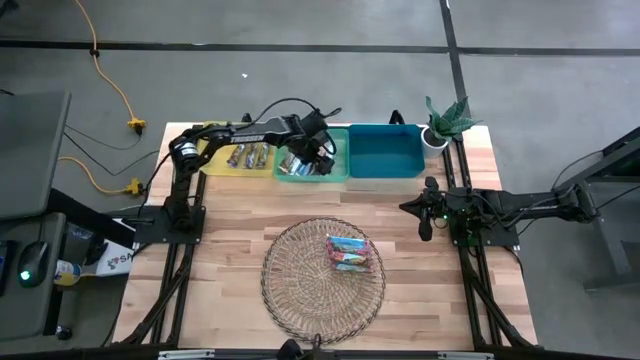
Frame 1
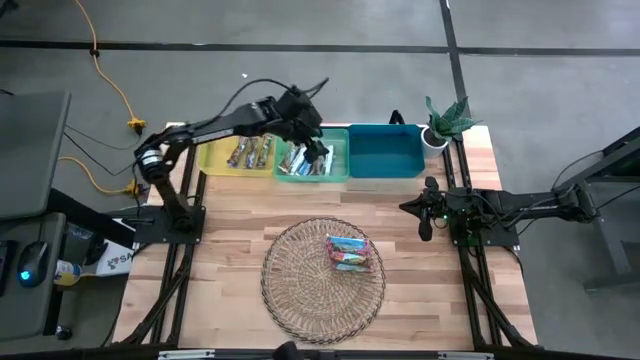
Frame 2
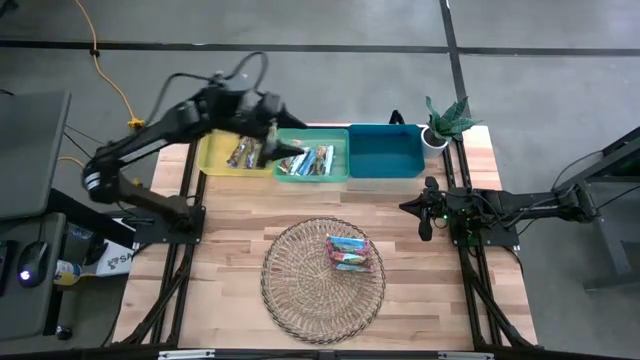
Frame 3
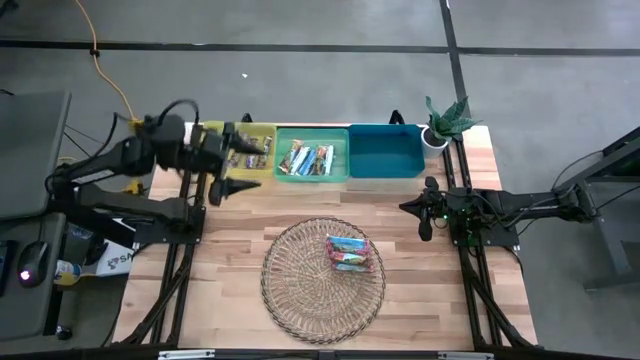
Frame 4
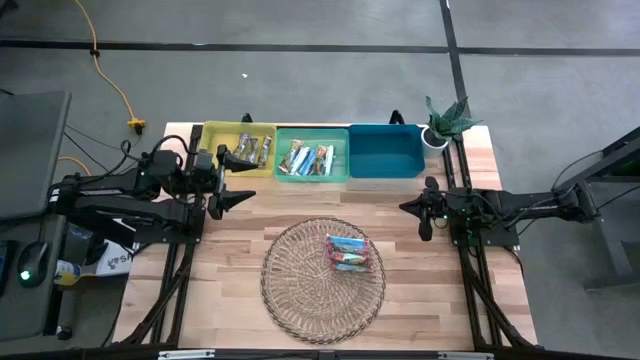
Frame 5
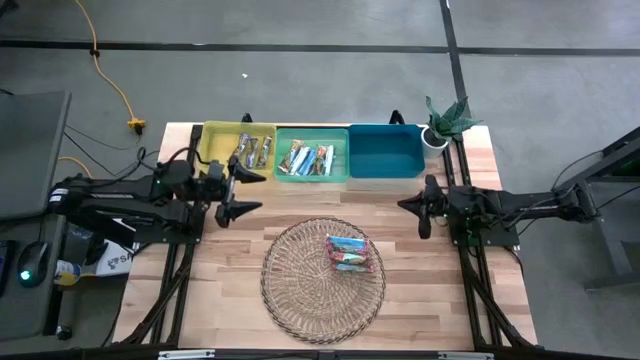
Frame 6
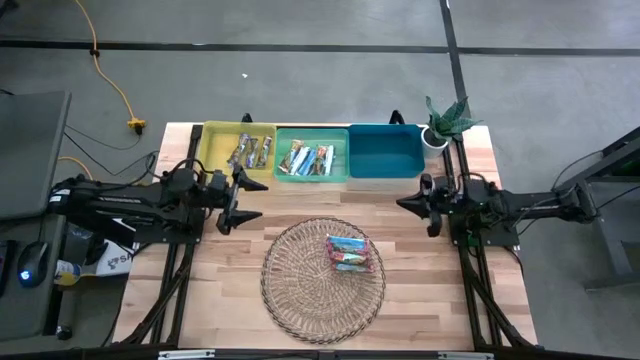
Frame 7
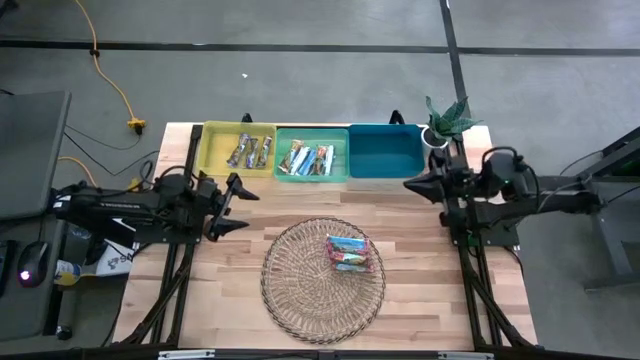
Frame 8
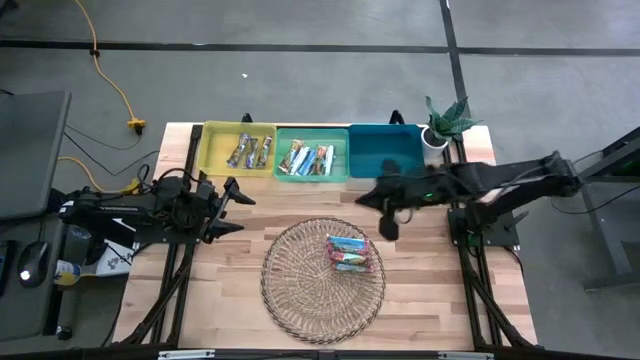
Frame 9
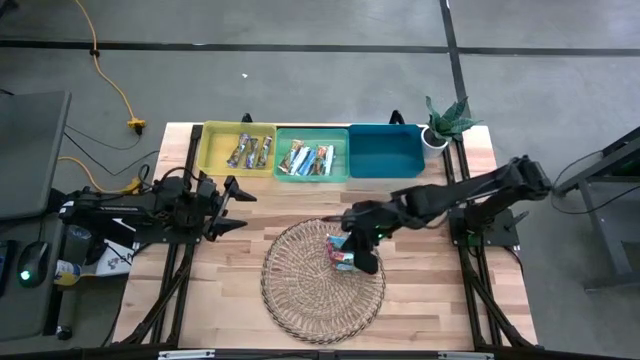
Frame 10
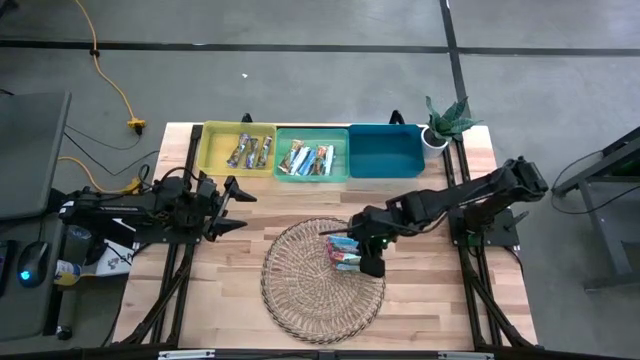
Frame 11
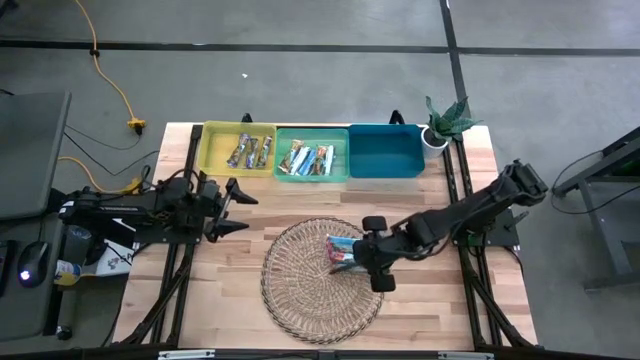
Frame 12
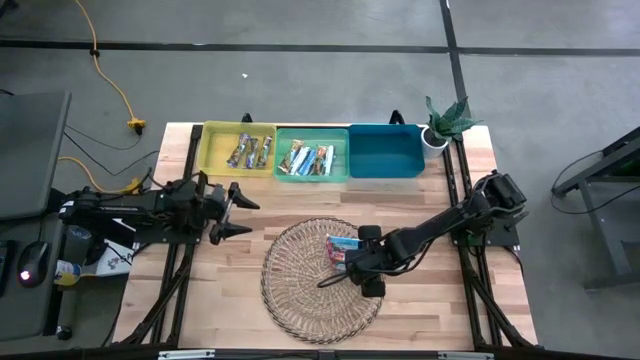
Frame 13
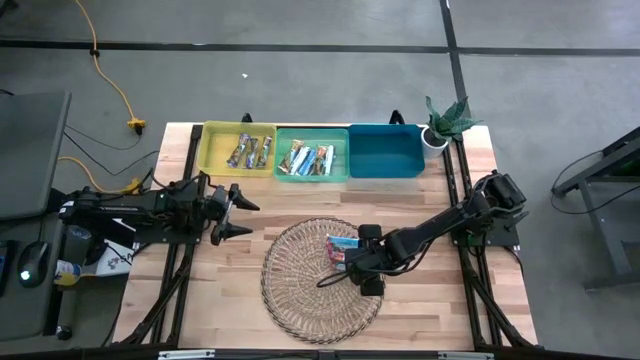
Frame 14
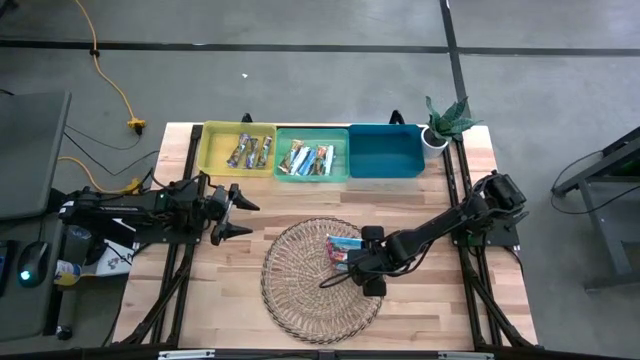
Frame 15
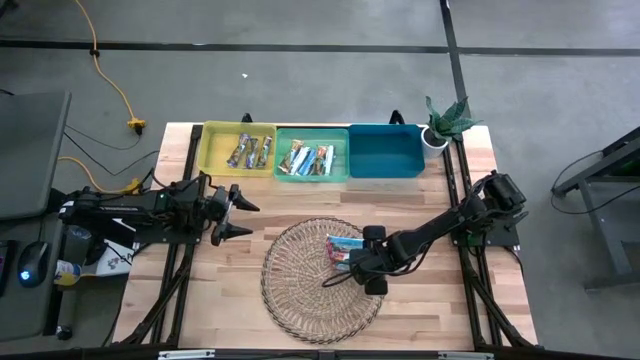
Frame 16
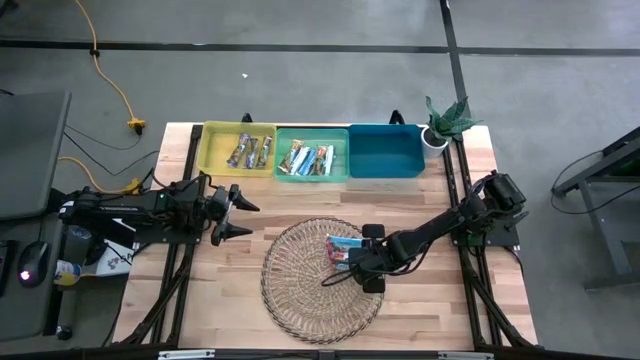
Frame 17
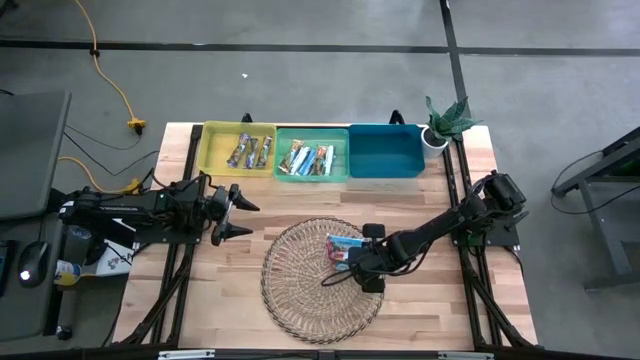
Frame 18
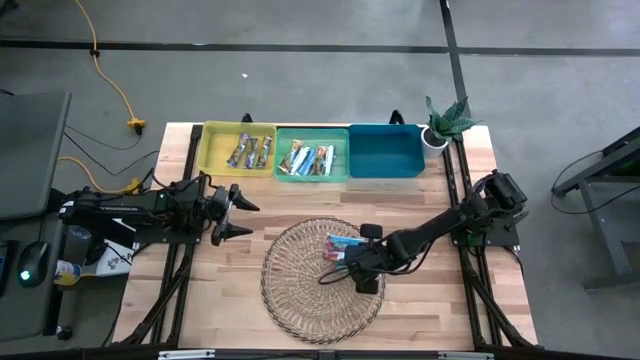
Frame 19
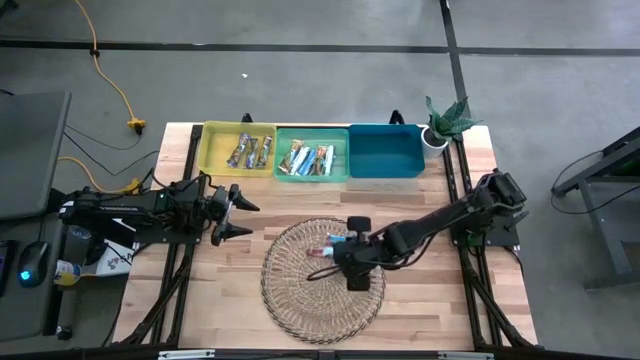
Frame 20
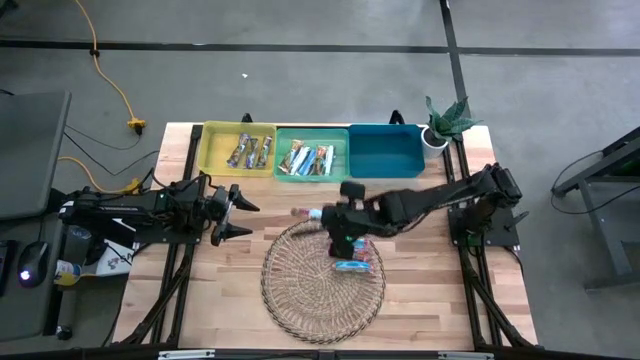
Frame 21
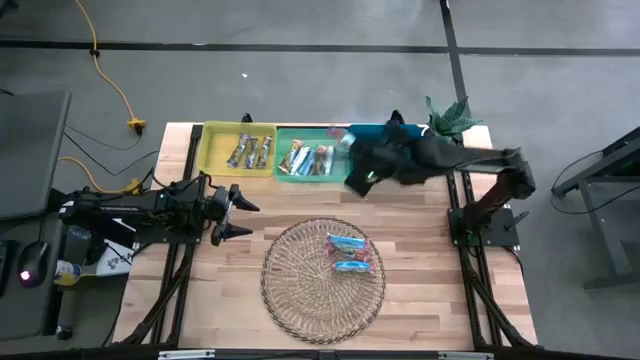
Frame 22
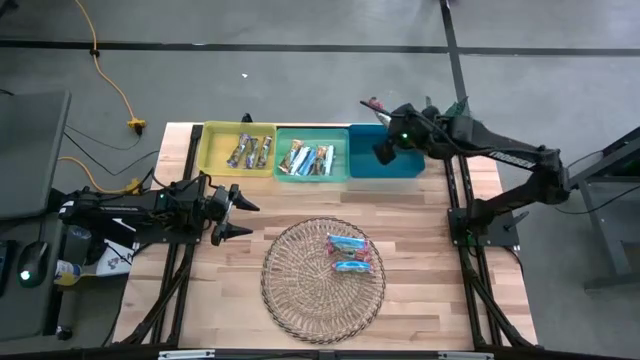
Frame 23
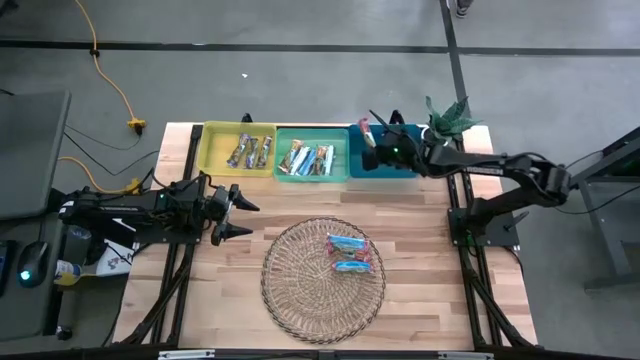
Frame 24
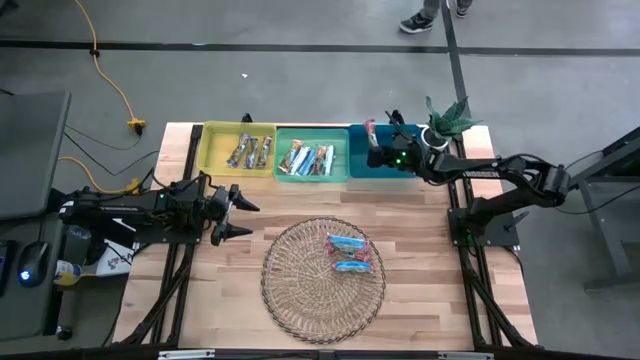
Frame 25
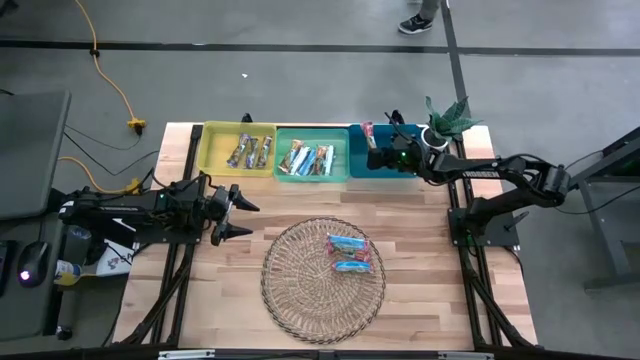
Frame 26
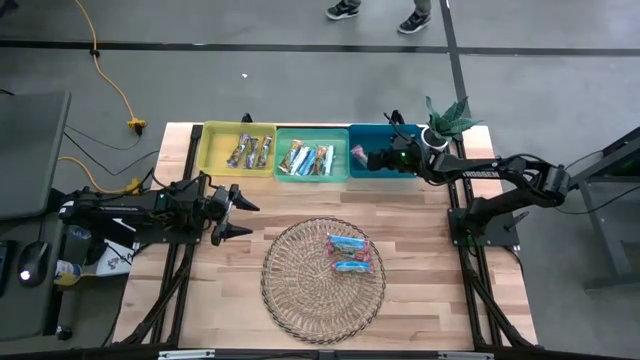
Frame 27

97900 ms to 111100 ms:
Task: Pick and place Granola Bars by type
Put the red granola bar into the blue bin

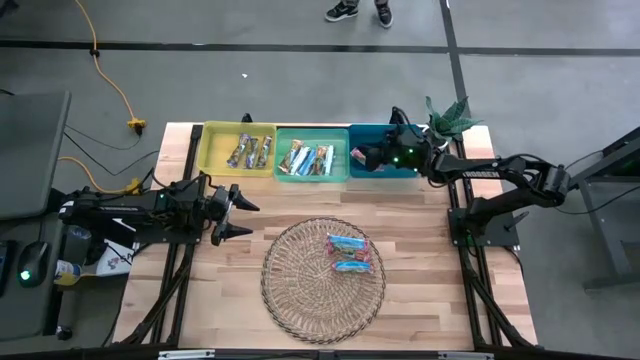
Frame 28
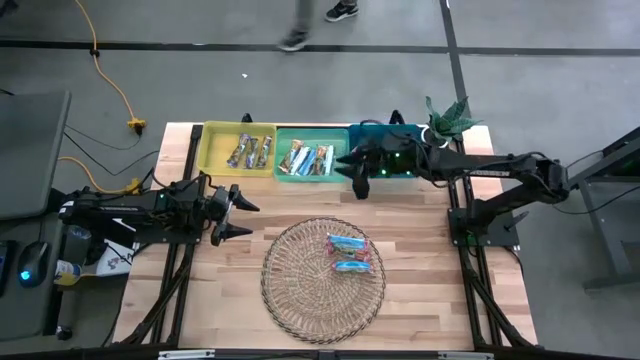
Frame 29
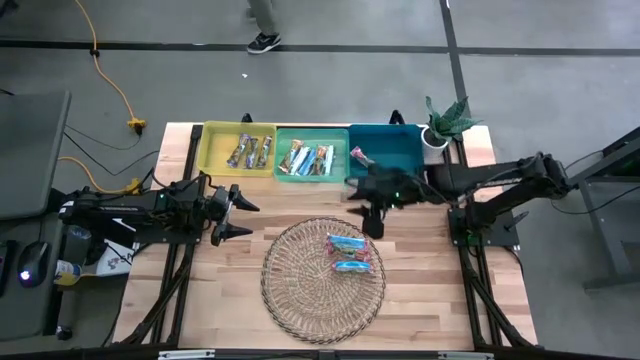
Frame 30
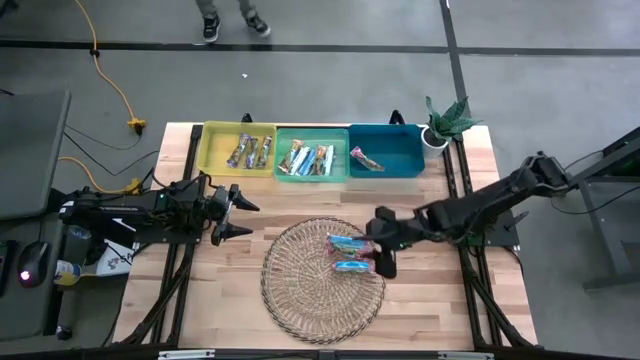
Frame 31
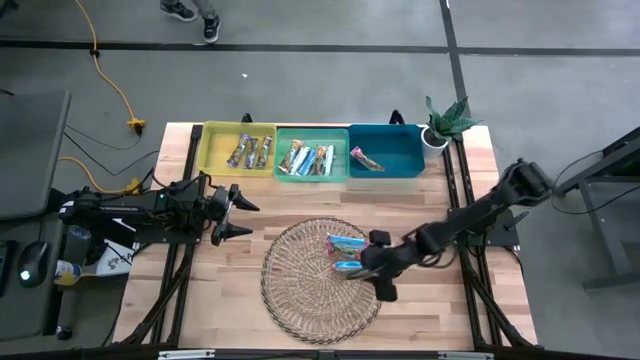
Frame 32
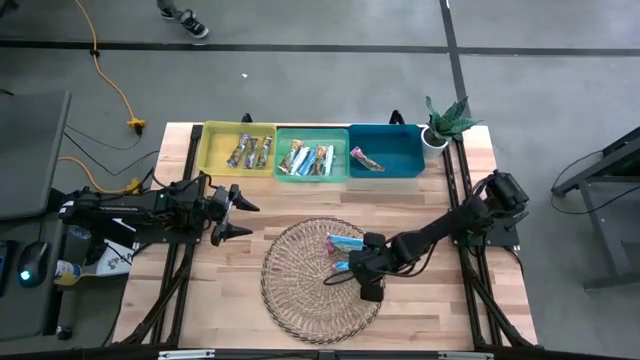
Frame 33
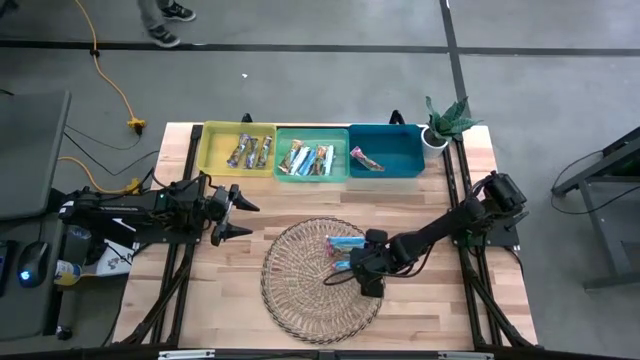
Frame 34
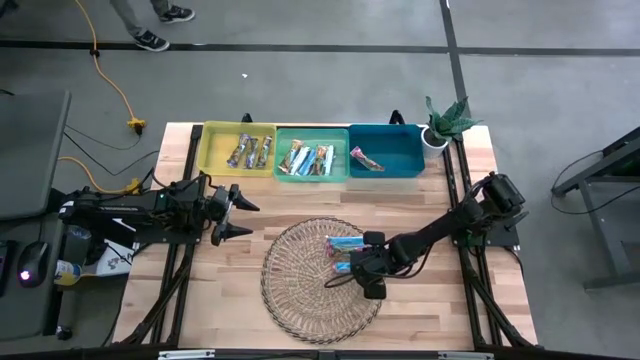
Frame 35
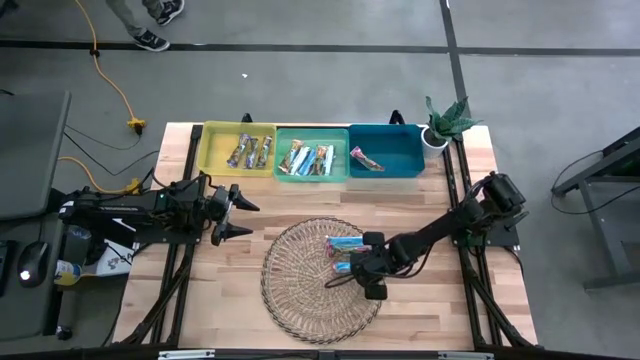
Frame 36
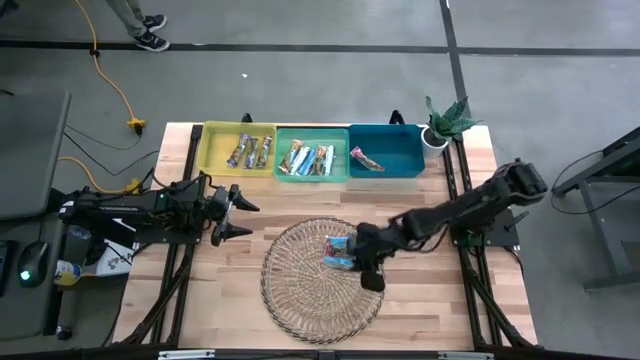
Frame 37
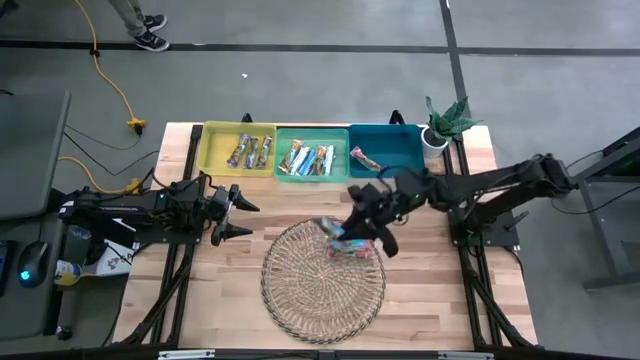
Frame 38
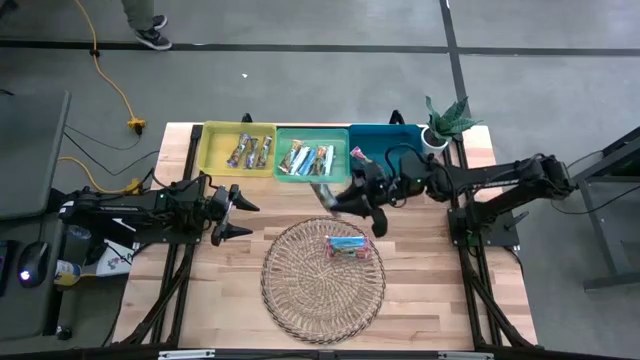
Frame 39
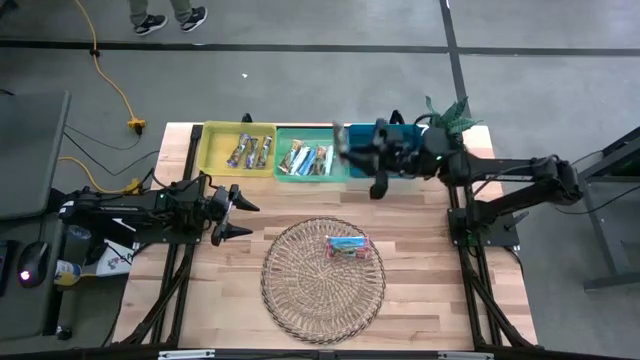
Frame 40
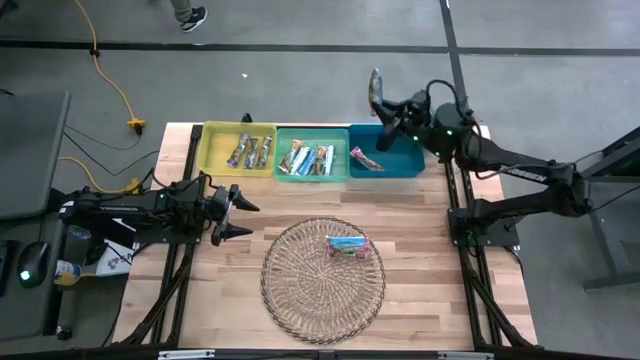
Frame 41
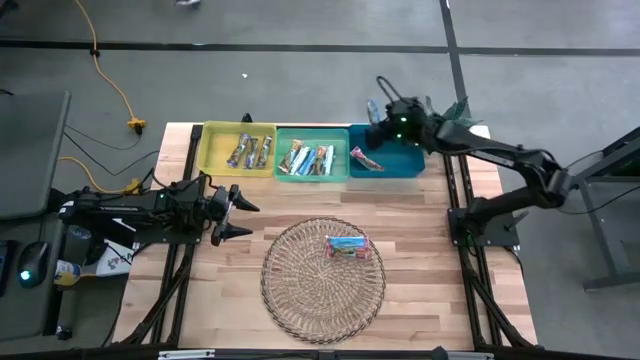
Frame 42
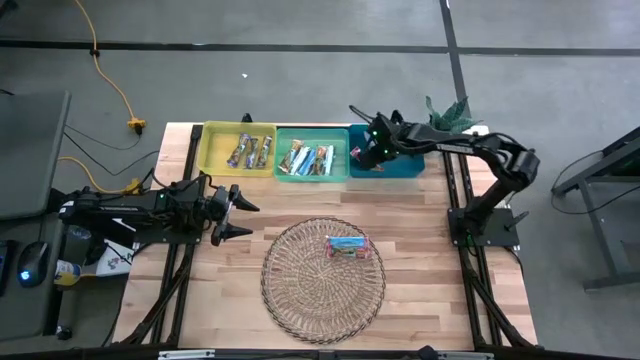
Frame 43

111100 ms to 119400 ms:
Put the red granola bar into the blue bin
